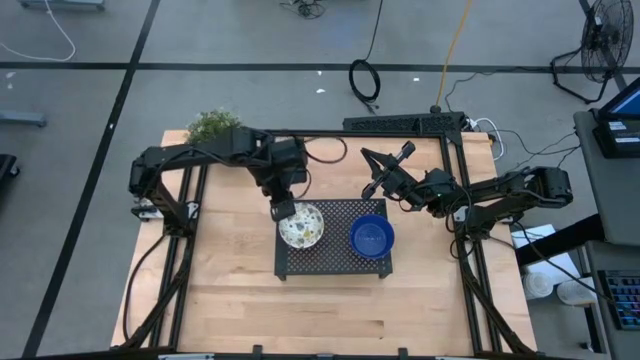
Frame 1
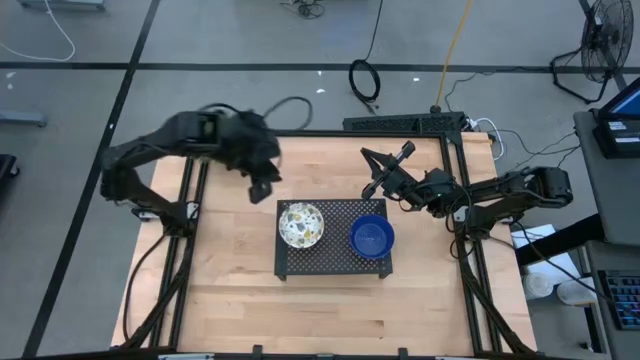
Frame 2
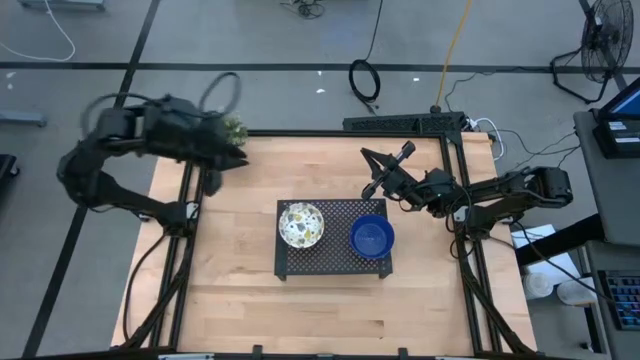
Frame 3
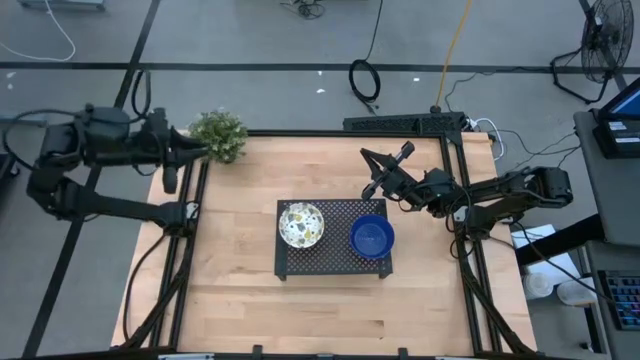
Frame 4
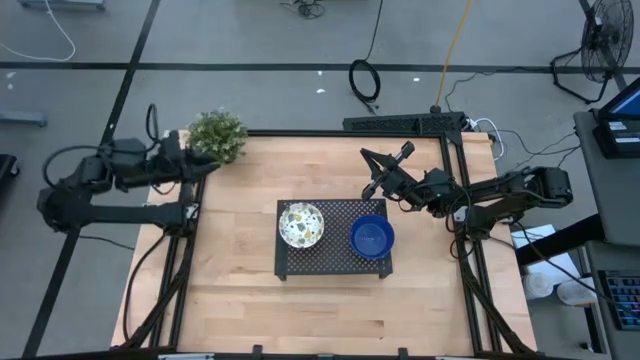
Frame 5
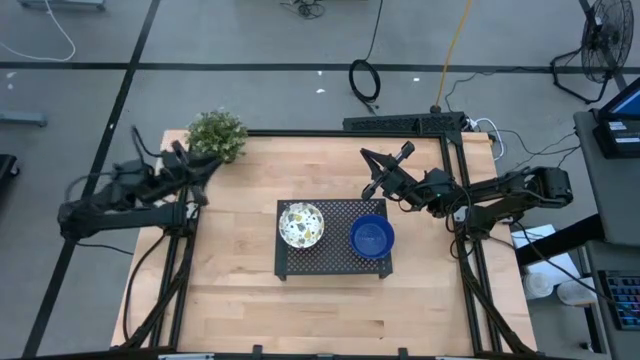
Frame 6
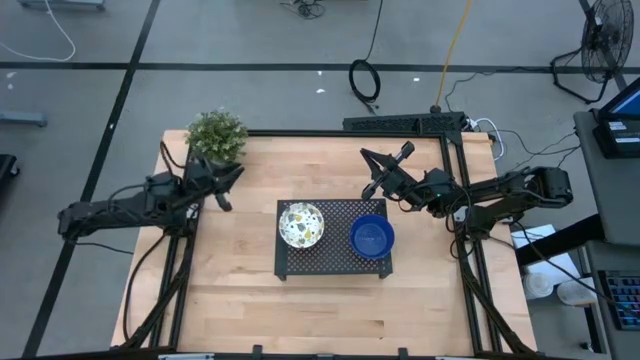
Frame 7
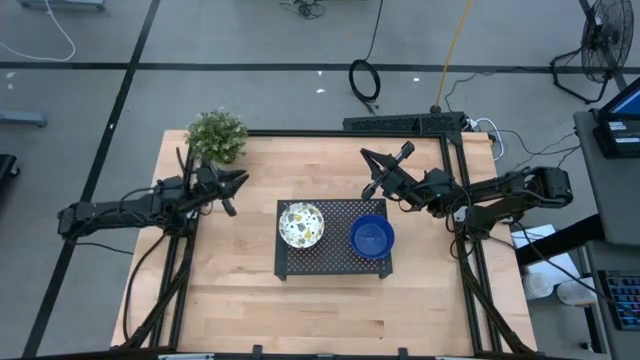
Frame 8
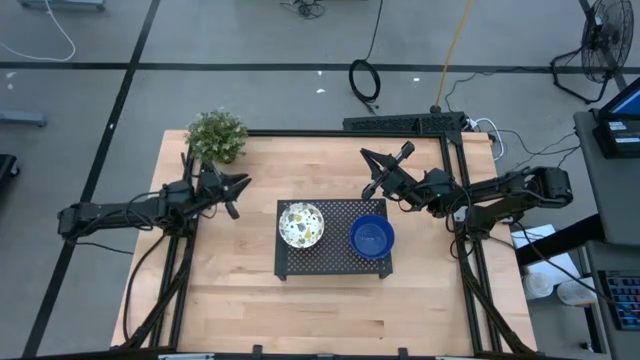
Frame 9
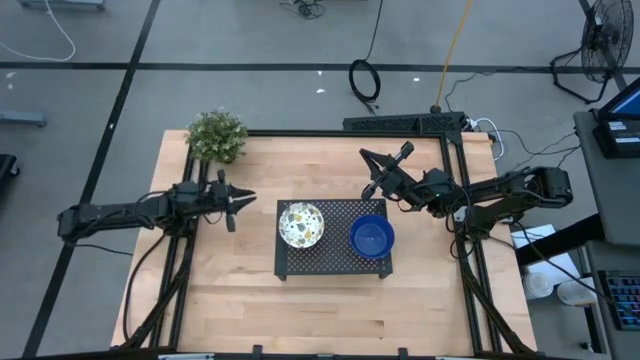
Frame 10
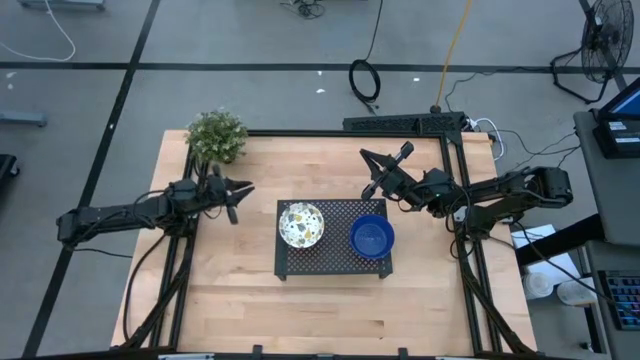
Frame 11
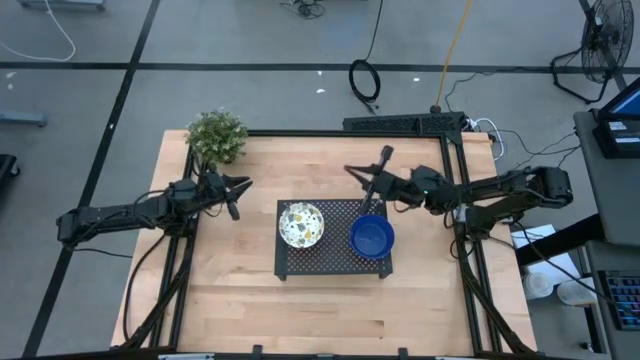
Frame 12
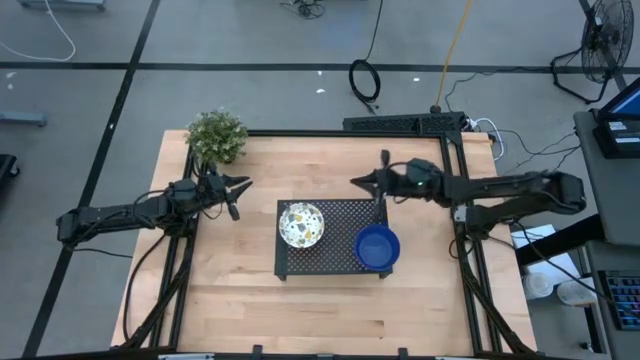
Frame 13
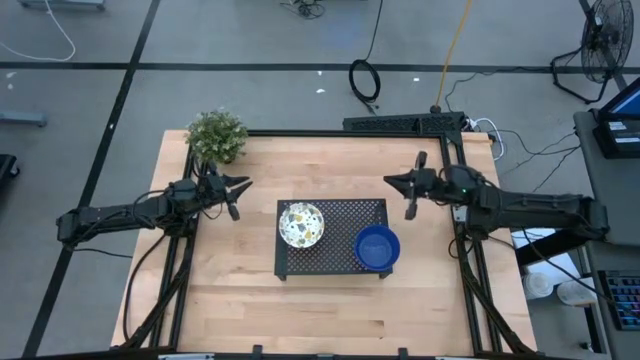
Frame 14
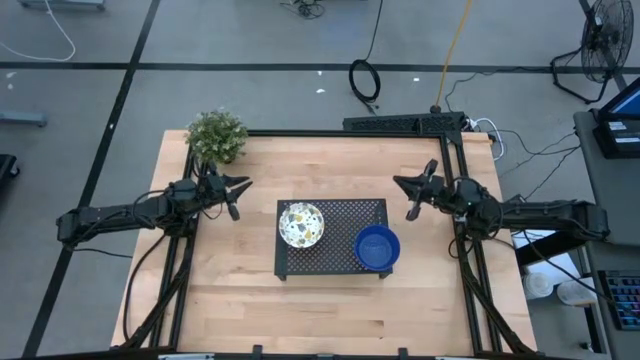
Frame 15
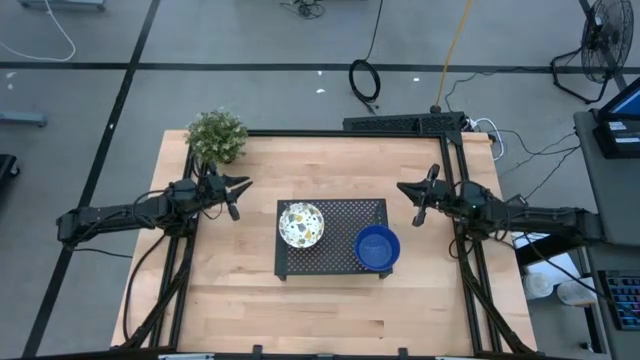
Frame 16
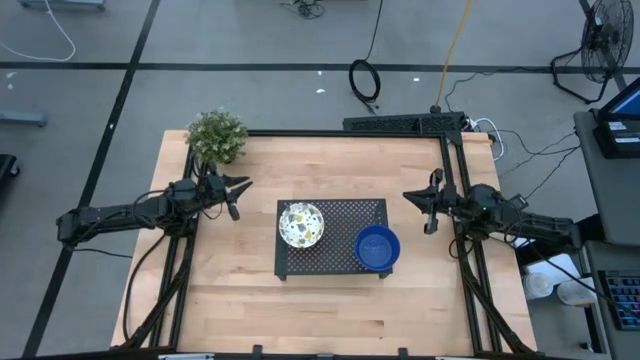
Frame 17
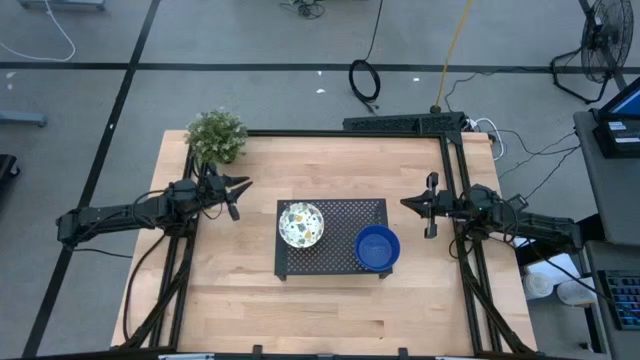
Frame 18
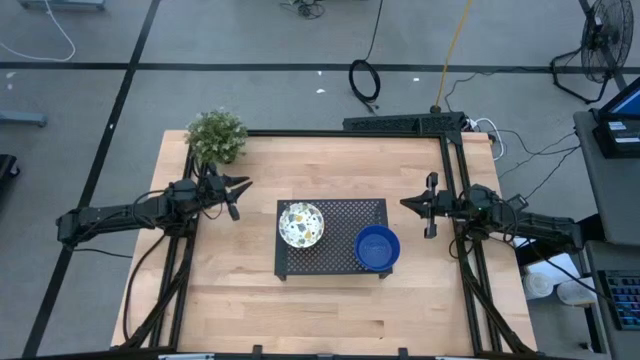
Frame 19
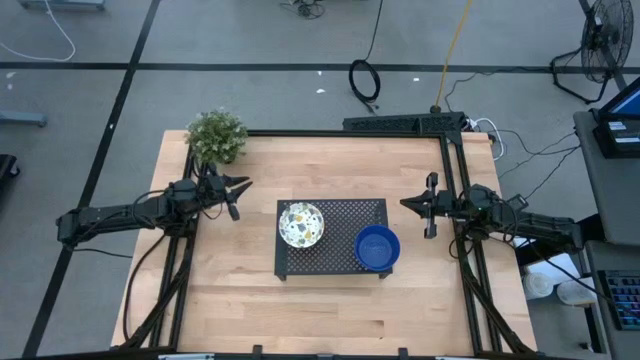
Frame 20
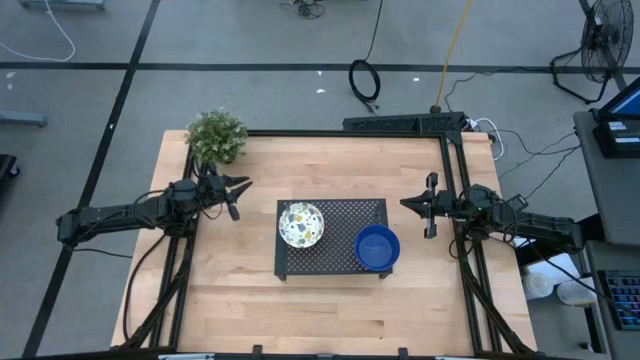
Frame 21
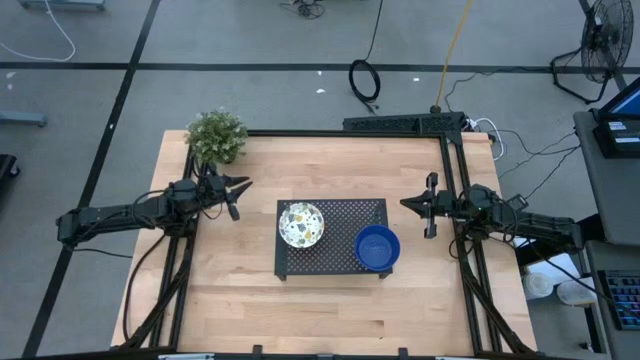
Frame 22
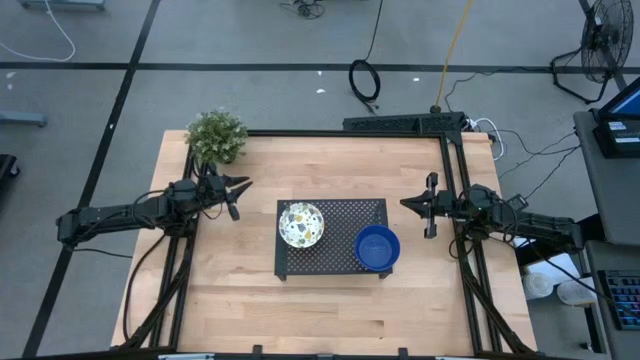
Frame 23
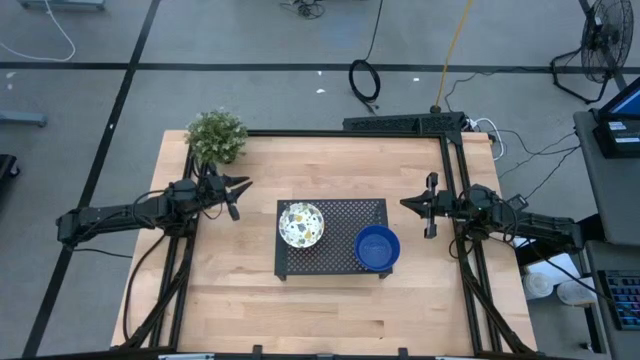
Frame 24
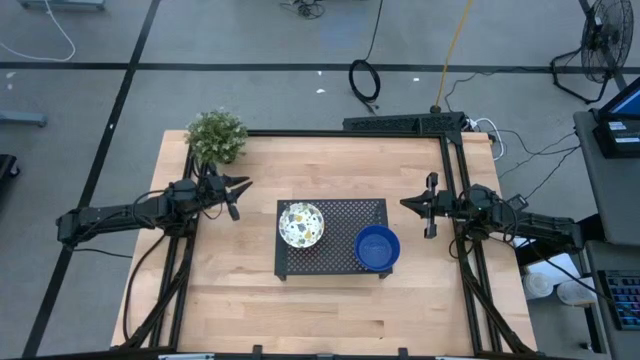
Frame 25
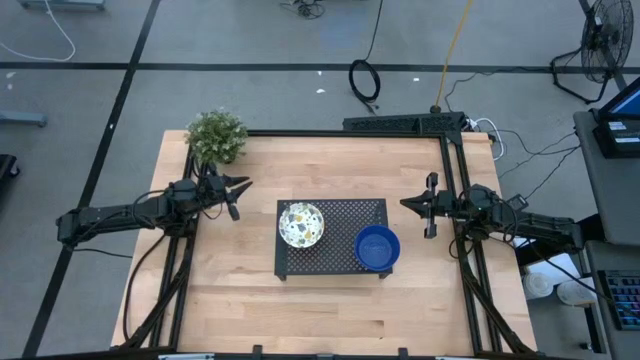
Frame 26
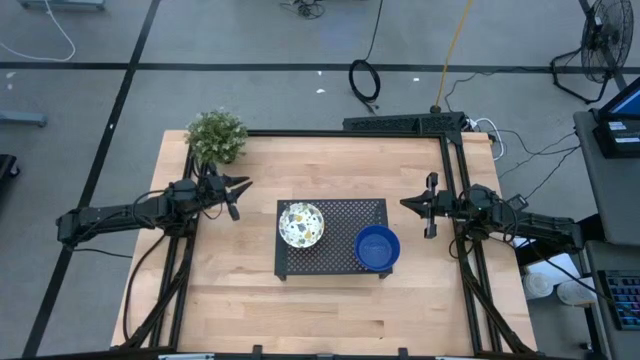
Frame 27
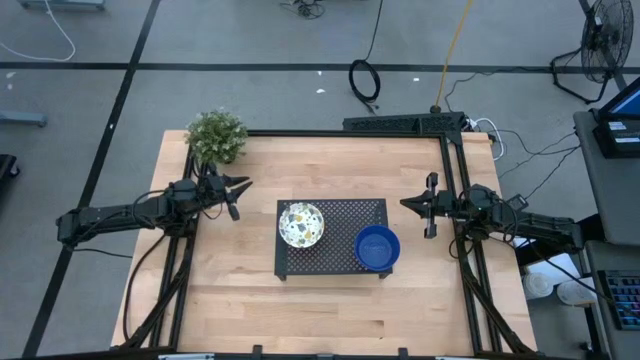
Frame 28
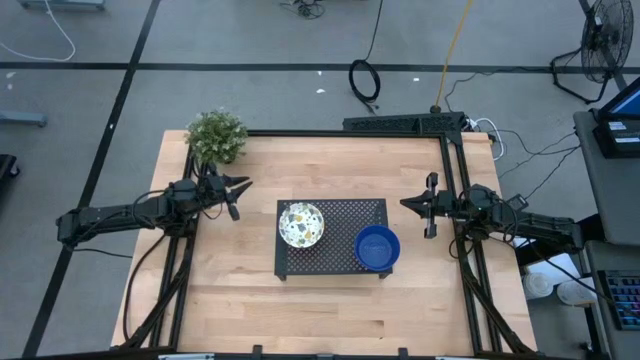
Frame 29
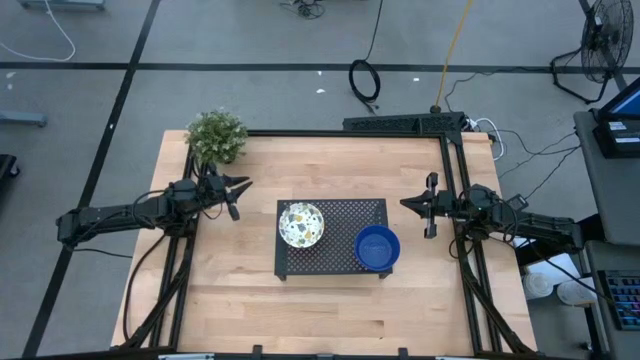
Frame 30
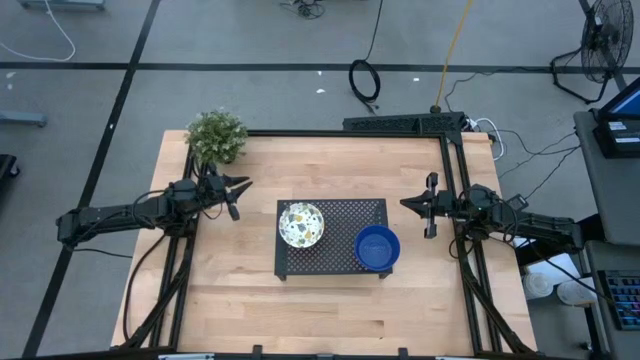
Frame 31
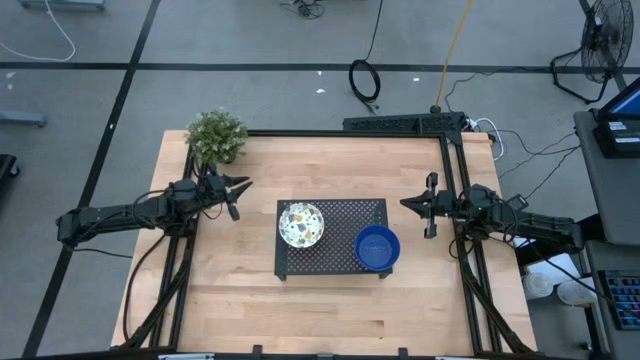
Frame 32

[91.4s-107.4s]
Task: Pick & Place Mini bowls
Return to Home Position

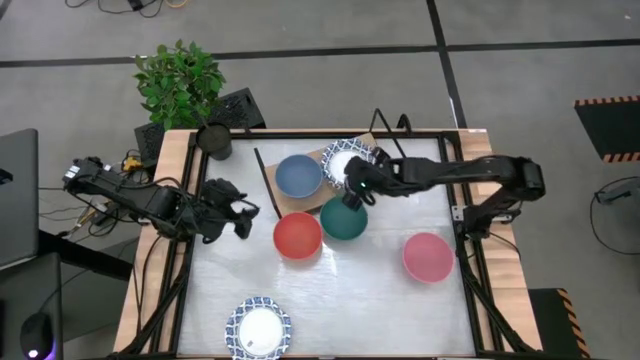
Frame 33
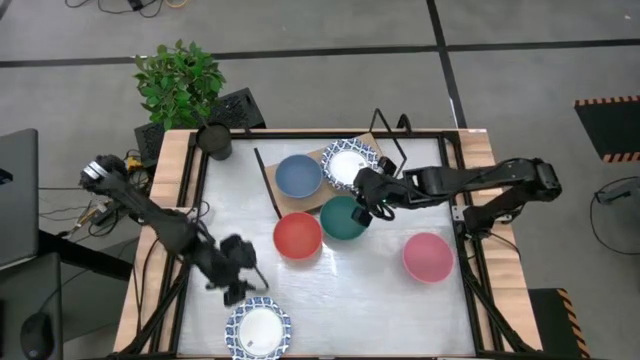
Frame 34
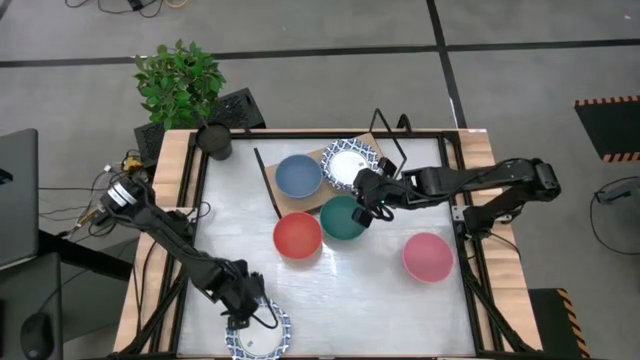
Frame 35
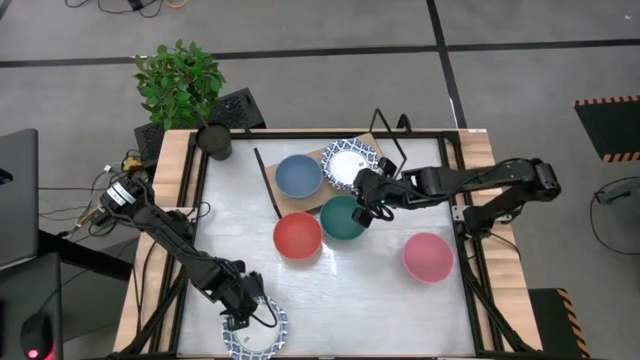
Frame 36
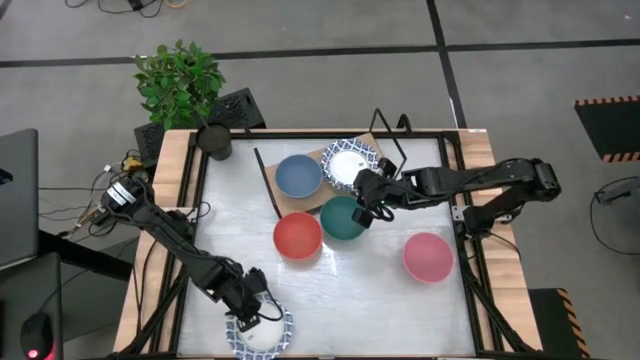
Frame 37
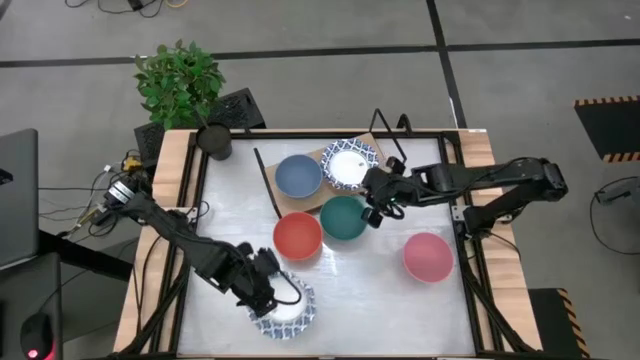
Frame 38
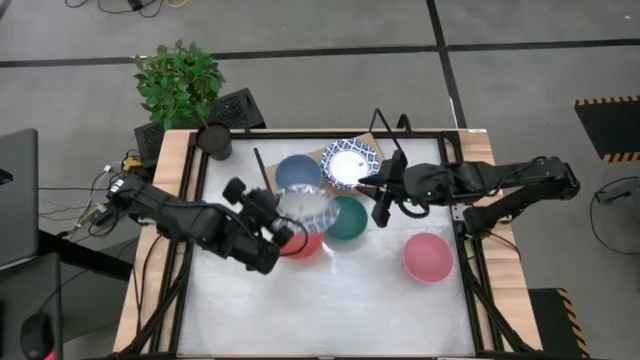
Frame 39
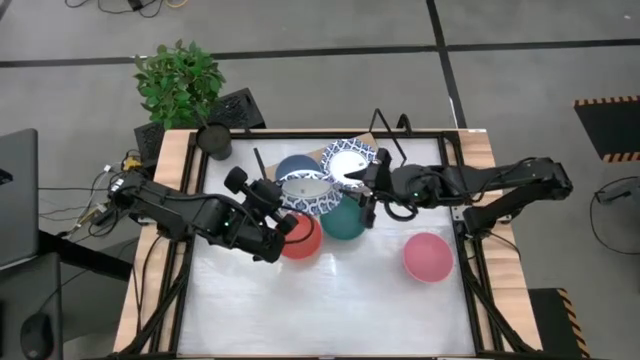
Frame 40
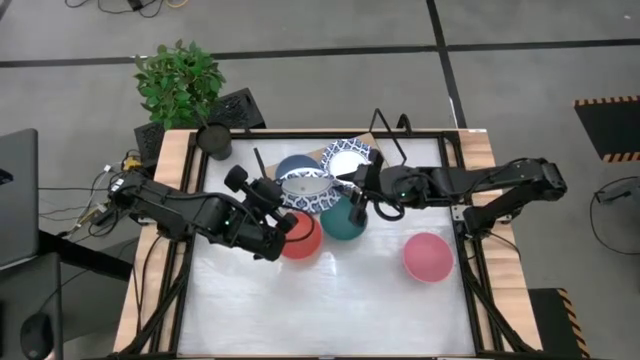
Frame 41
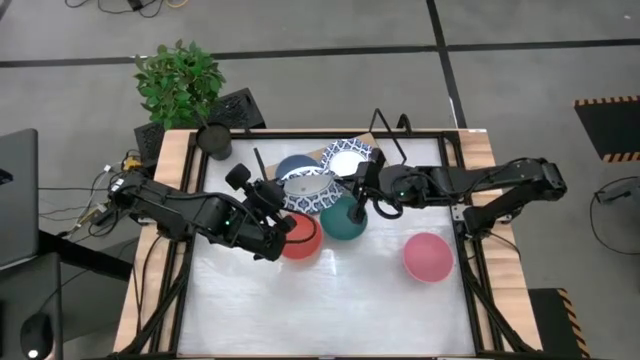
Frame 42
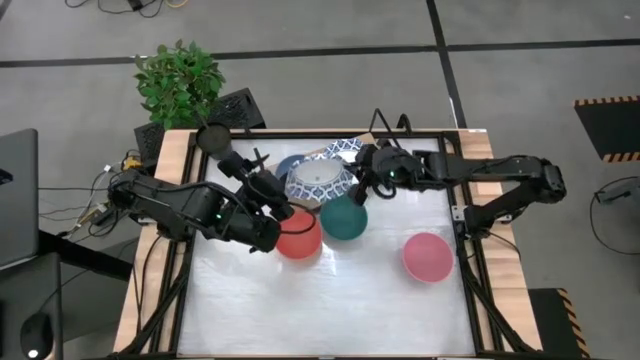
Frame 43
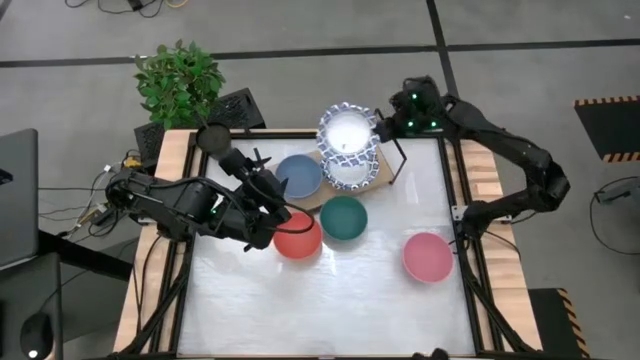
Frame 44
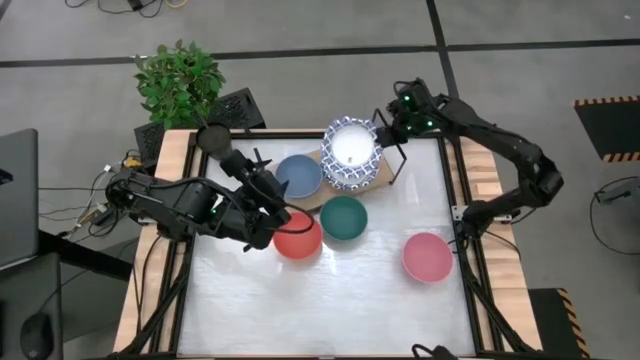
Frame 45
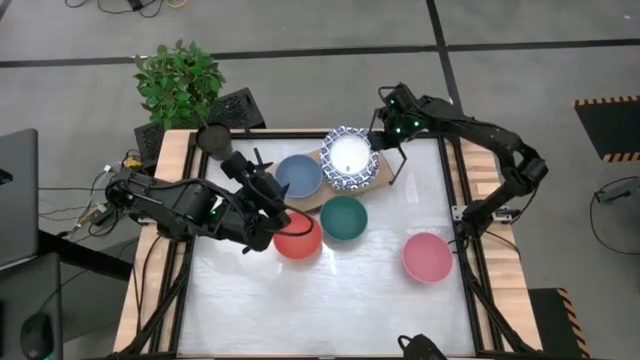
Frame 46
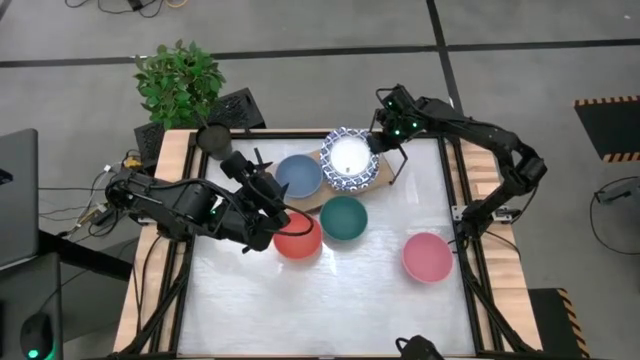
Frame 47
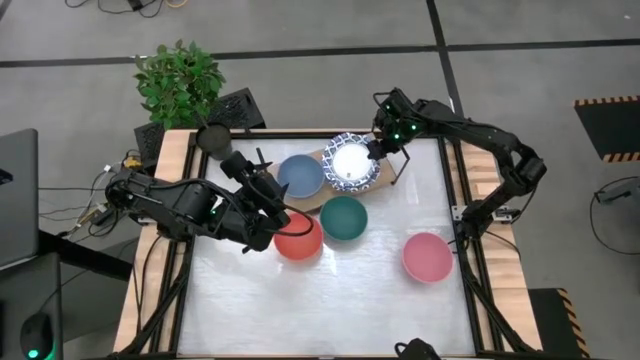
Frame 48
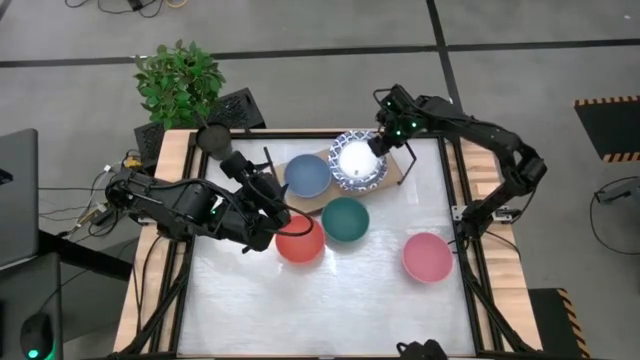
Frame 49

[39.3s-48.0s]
Task: Place and stack bowls onto a shelf
Stack the white patterned bowl on top of the white patterned bowl
